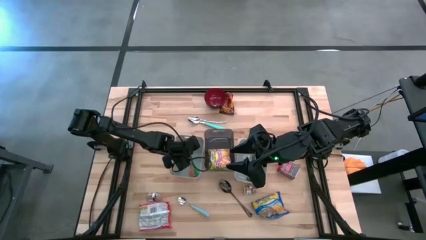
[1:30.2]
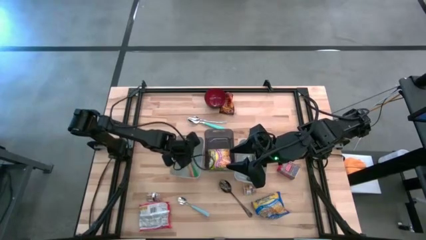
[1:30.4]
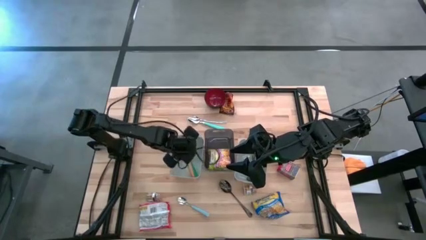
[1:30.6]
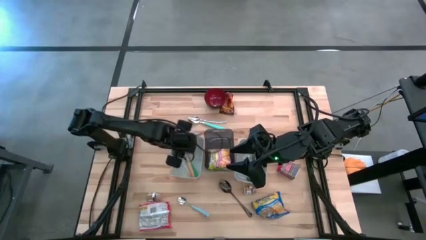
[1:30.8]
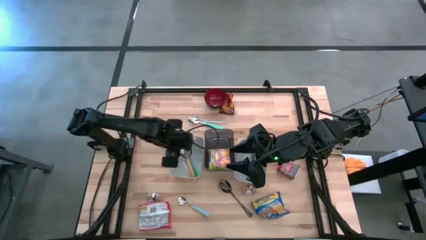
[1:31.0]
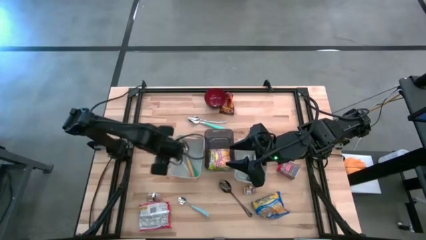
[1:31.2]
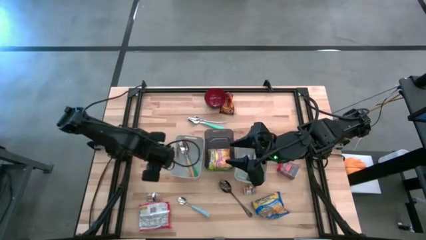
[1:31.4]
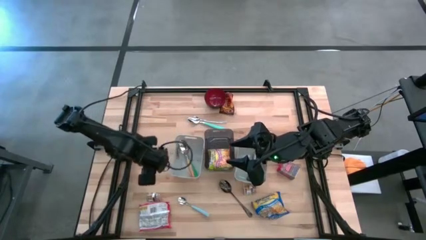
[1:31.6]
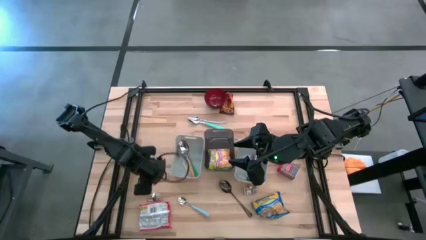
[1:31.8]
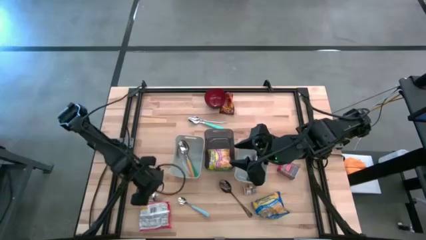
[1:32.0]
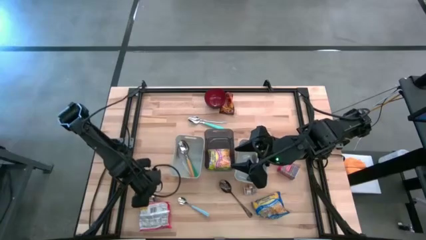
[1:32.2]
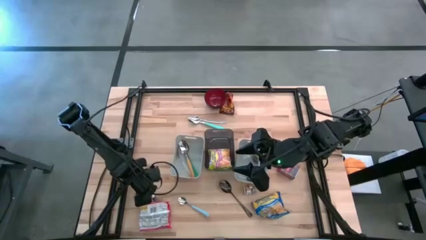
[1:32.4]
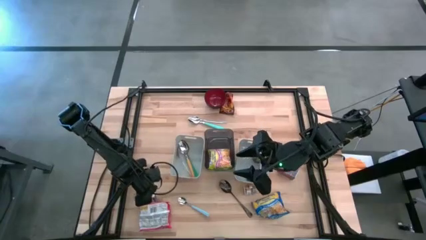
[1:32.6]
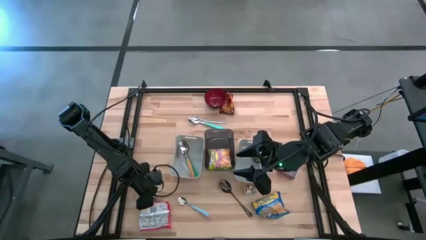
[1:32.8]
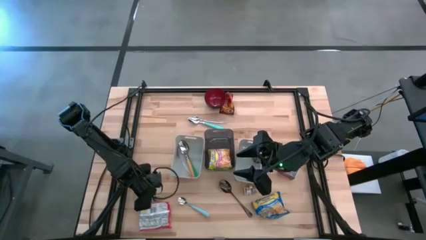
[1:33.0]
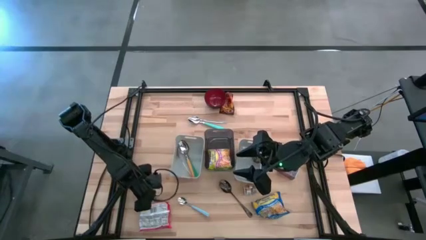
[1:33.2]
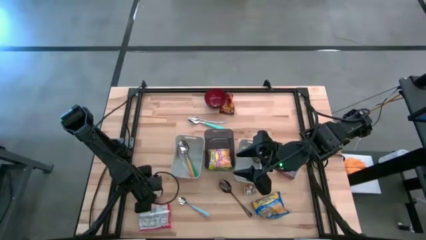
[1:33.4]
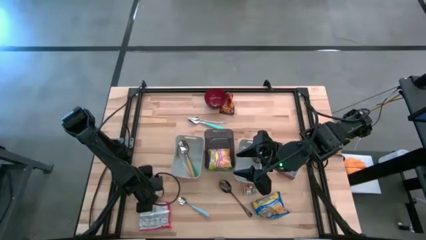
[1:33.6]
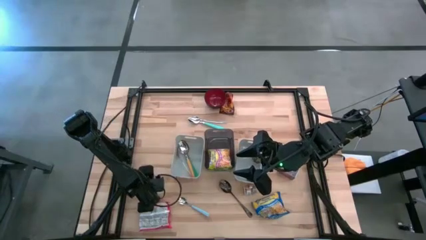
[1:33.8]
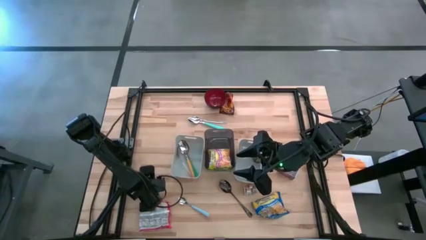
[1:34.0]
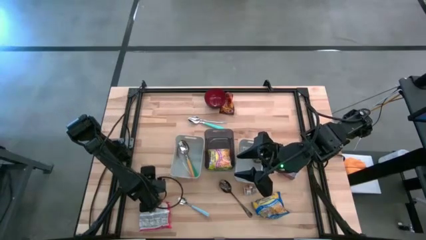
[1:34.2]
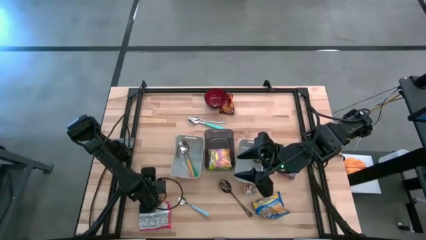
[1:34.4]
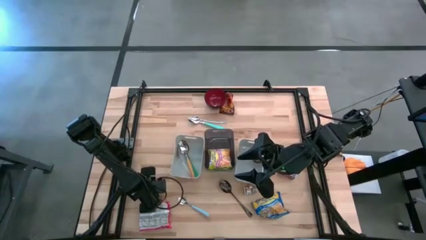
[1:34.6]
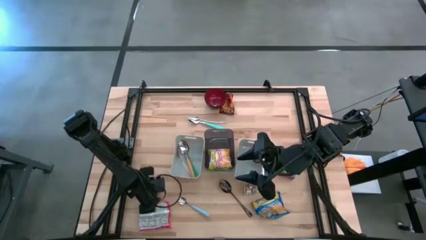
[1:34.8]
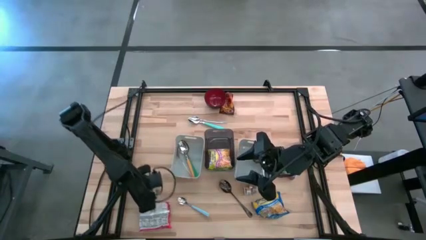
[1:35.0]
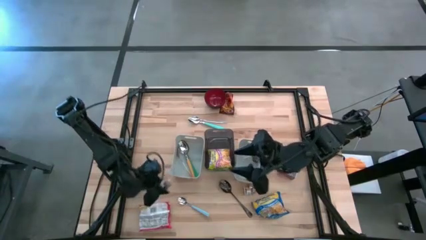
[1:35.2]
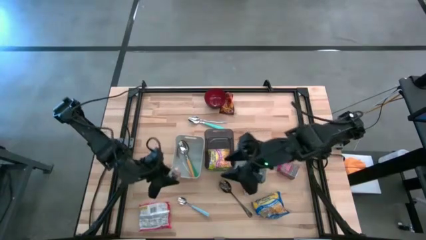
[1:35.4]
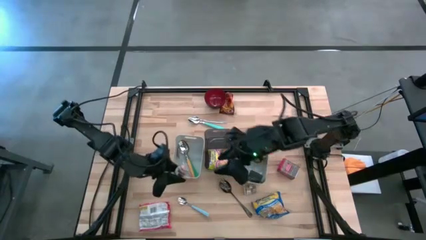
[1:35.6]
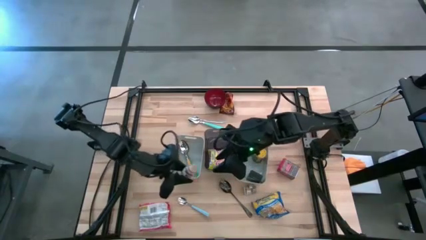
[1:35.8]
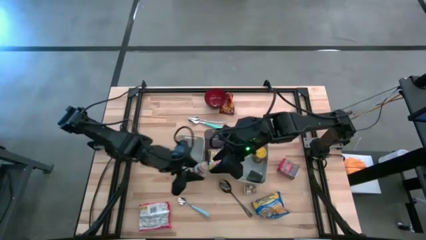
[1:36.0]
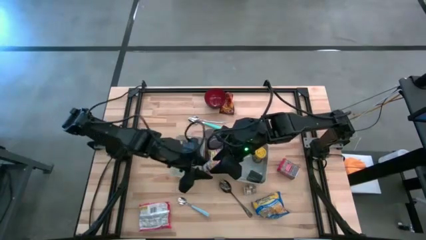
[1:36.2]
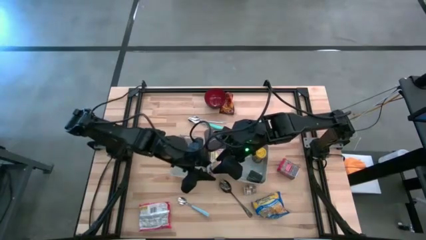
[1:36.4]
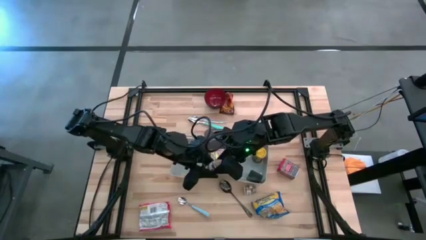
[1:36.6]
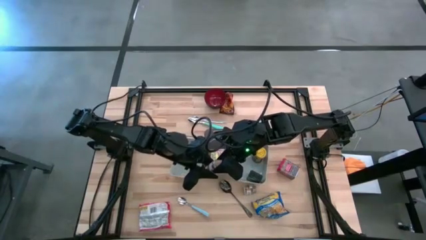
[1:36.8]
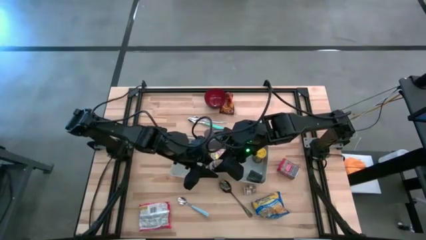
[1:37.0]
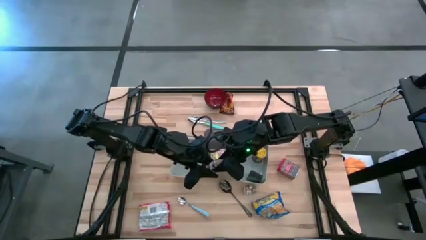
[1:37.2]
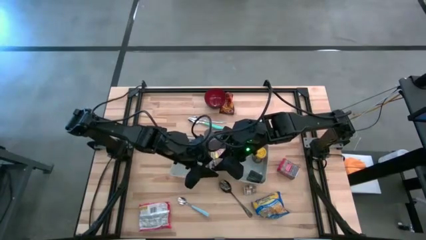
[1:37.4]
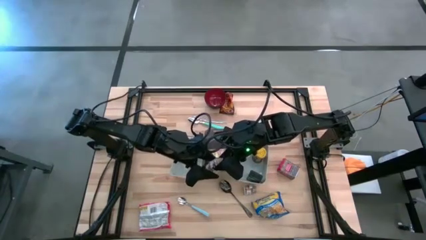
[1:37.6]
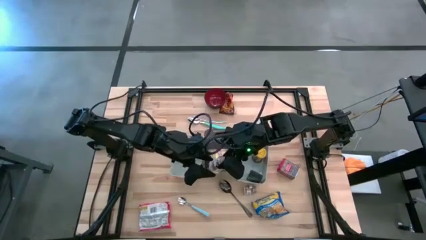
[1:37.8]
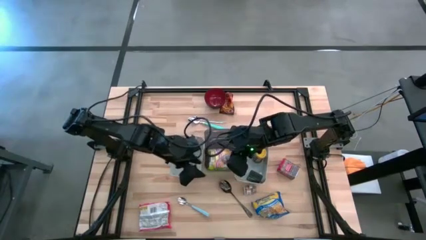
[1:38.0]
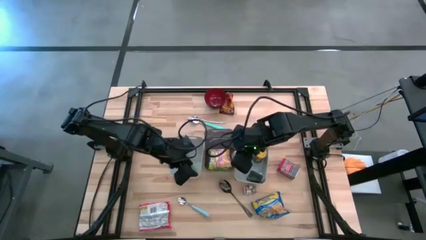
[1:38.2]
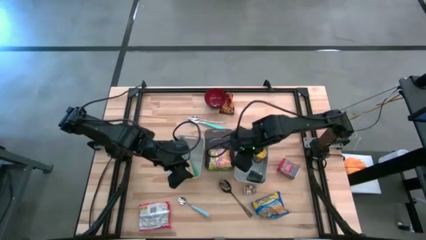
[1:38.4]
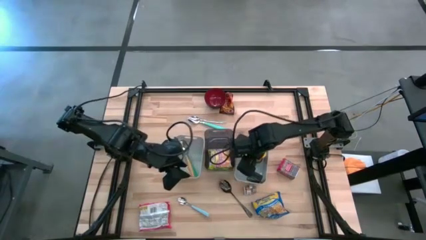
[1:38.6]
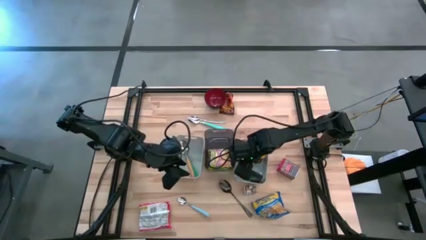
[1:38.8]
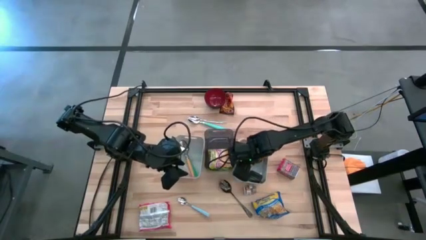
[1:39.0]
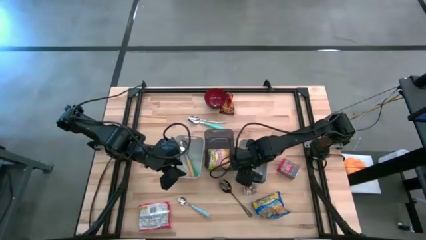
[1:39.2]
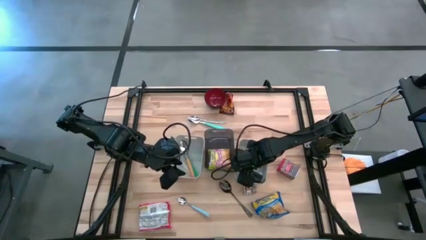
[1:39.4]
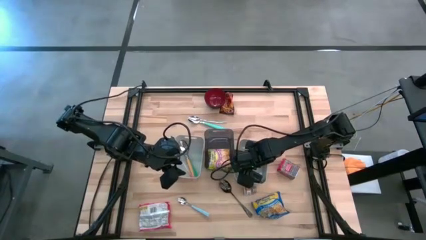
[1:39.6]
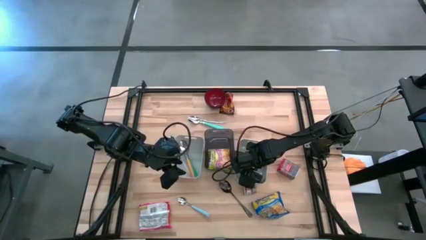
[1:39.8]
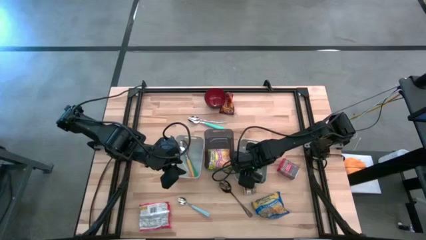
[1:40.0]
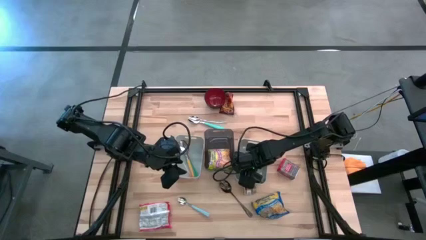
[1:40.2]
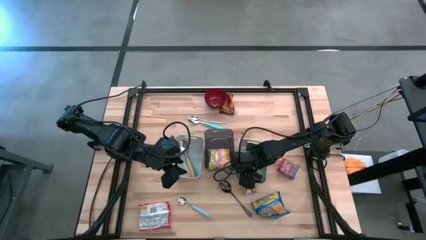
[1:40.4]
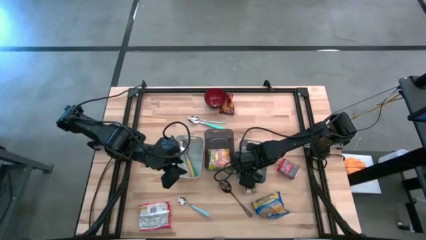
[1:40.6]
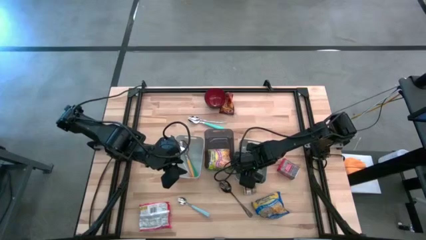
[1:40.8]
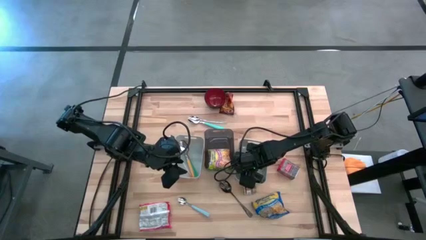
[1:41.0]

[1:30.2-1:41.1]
Put the left brown seasoning into the right gray bin

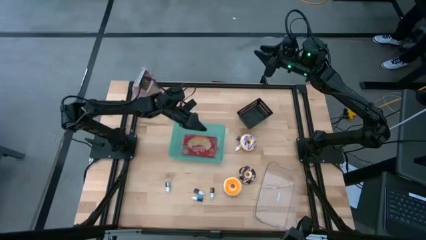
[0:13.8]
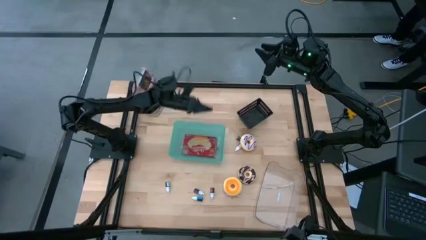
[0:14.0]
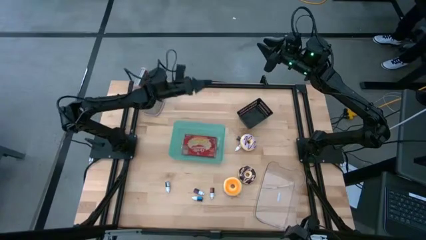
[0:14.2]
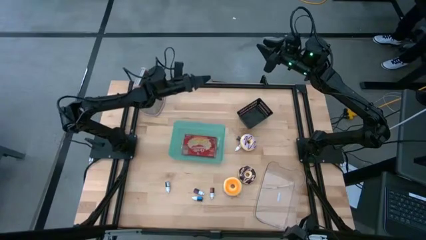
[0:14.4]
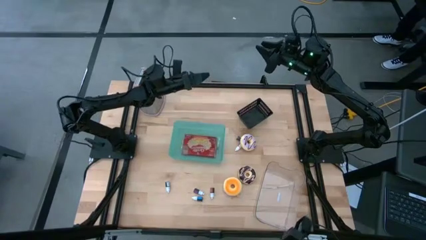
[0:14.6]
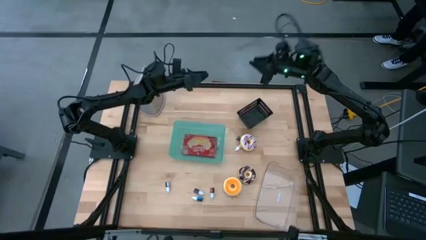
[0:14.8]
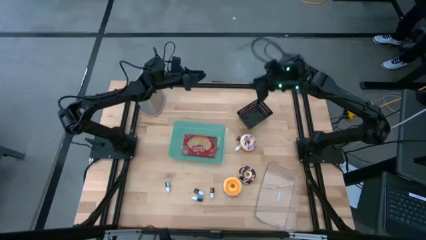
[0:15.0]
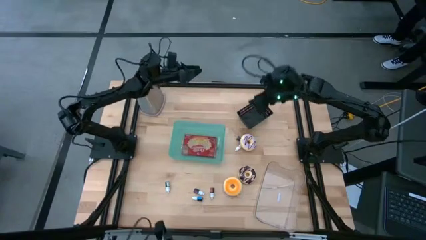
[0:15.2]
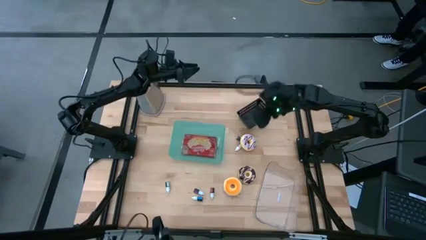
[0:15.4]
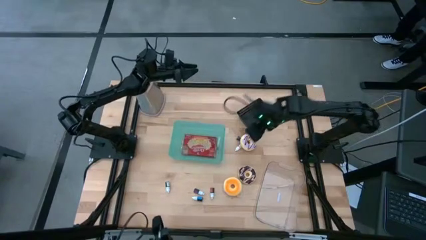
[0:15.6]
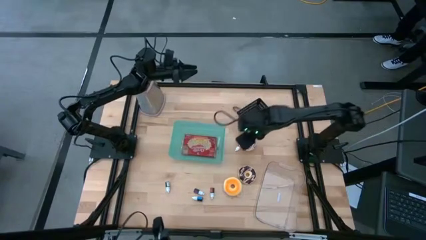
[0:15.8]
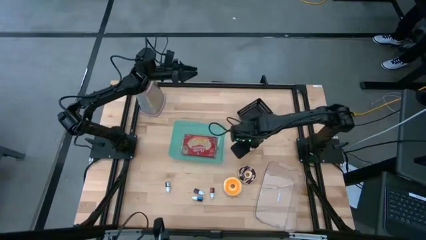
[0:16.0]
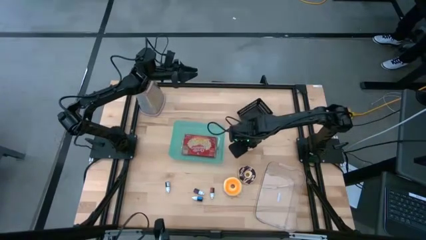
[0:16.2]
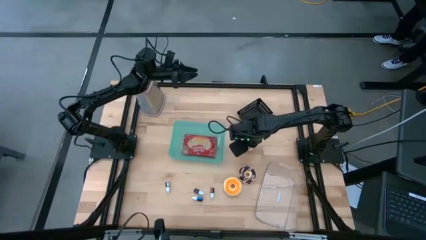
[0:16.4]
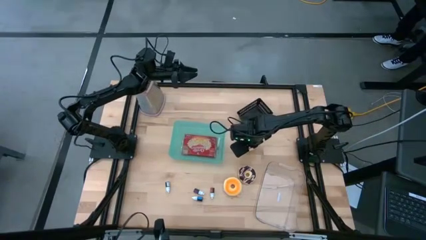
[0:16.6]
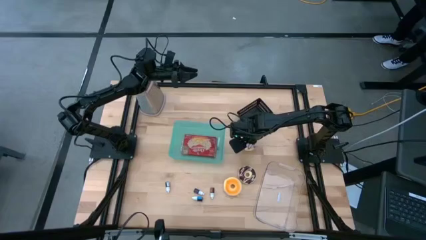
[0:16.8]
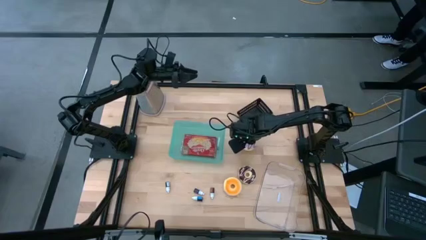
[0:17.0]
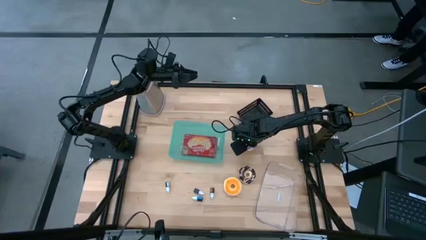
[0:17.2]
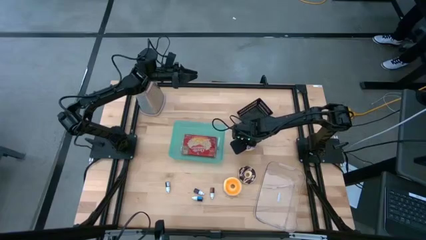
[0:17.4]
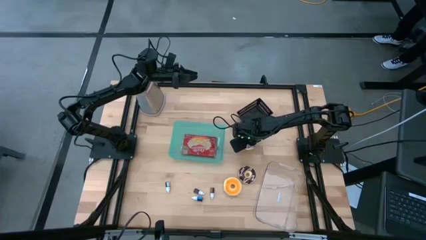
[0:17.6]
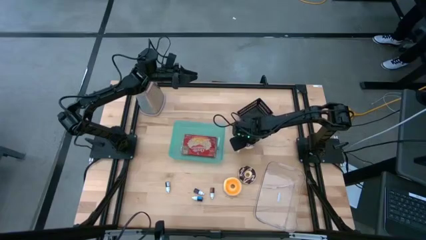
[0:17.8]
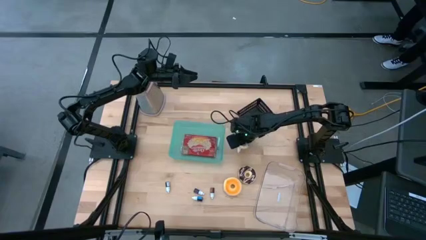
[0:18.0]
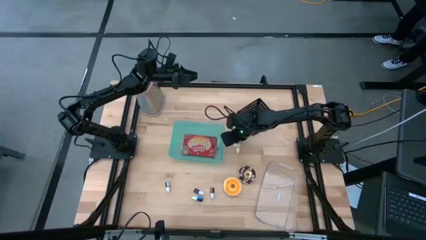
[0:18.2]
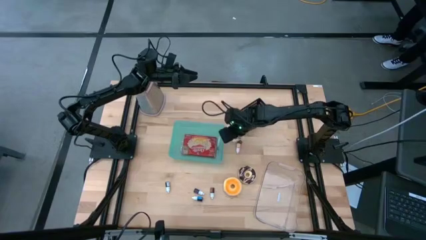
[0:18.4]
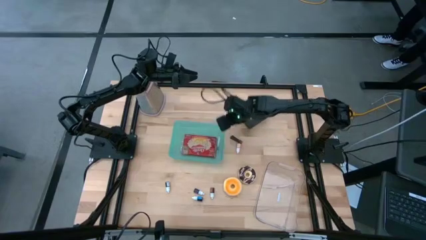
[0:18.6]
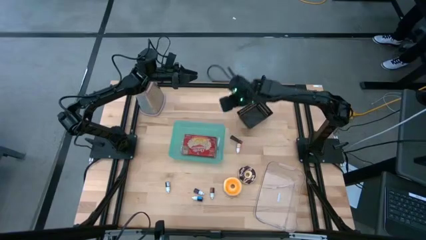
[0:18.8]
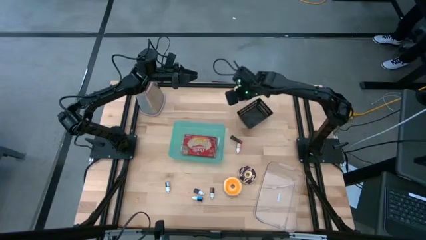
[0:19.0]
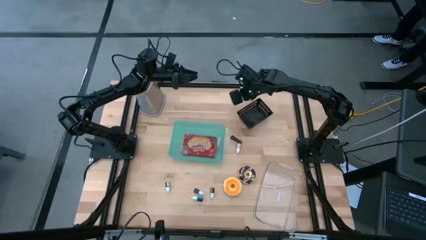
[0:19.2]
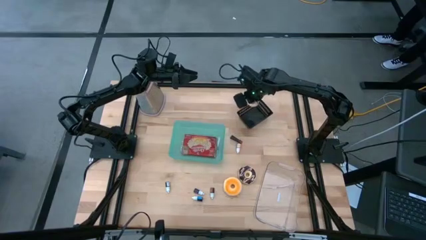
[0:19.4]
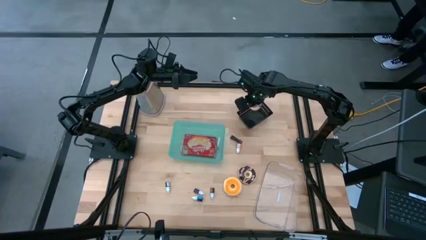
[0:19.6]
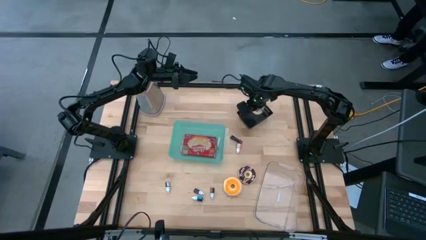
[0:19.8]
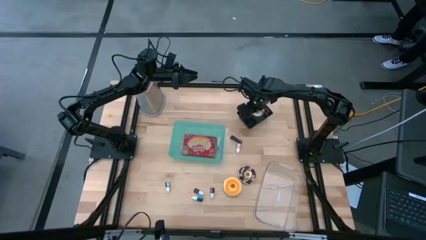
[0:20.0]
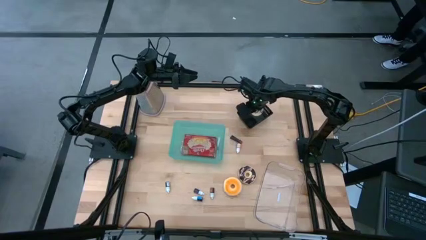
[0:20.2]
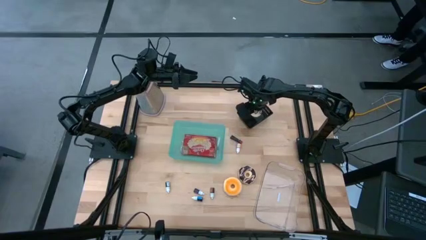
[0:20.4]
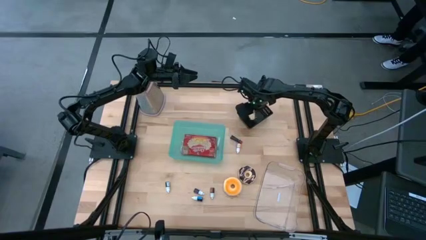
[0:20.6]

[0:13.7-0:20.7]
Put the purple donut into the black bin
